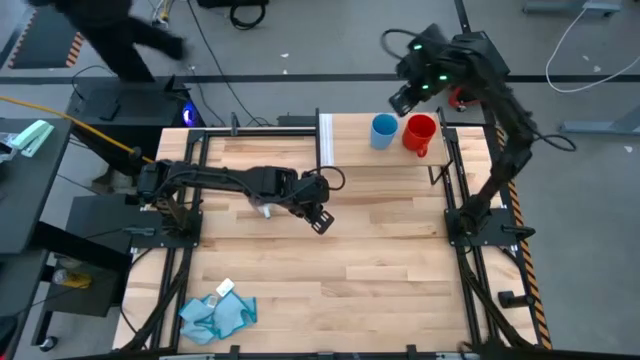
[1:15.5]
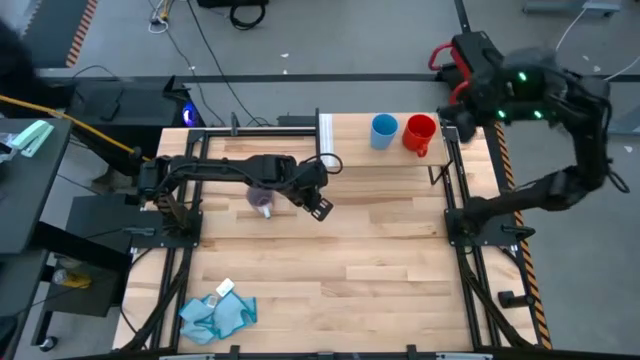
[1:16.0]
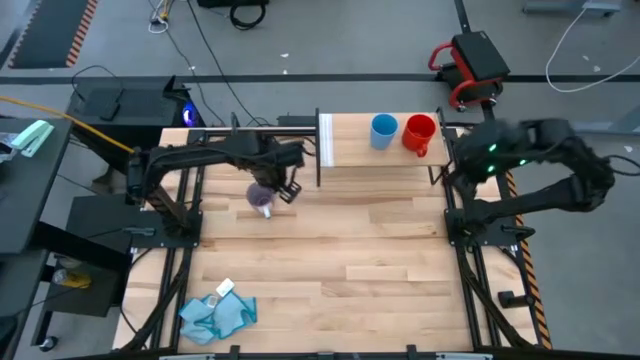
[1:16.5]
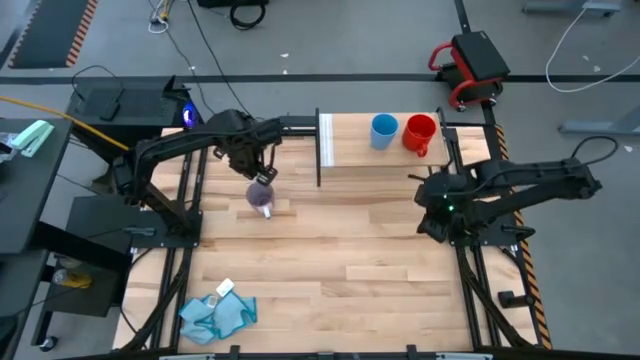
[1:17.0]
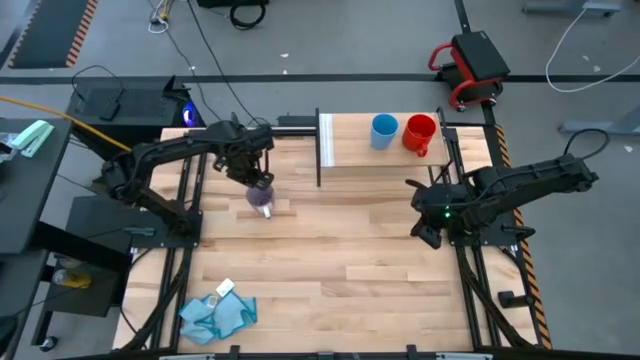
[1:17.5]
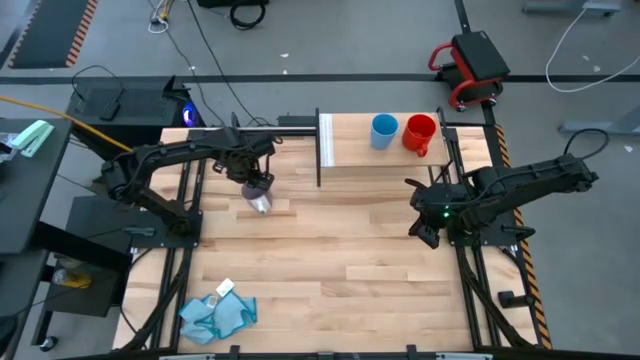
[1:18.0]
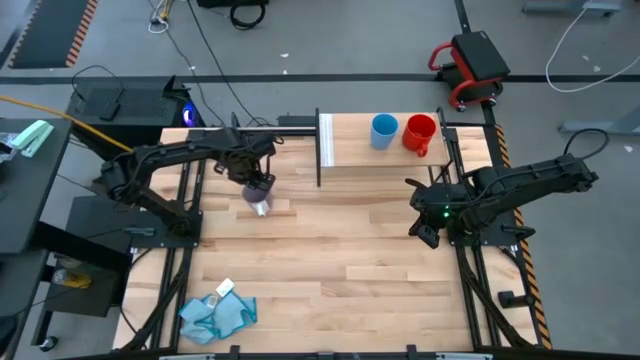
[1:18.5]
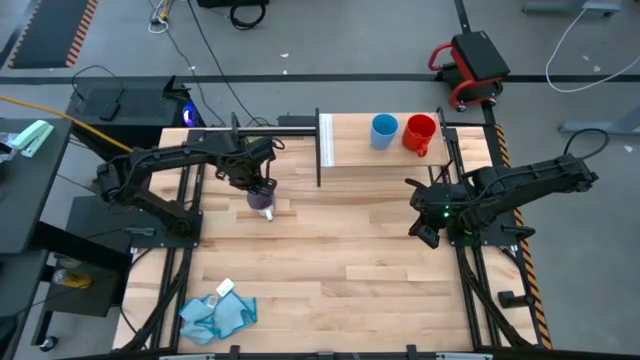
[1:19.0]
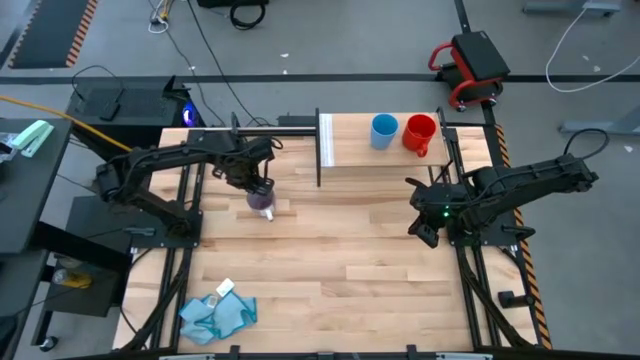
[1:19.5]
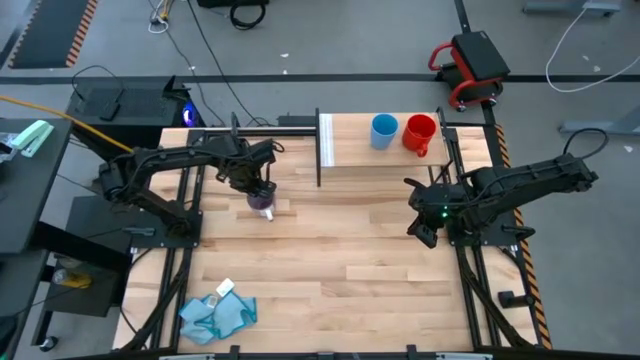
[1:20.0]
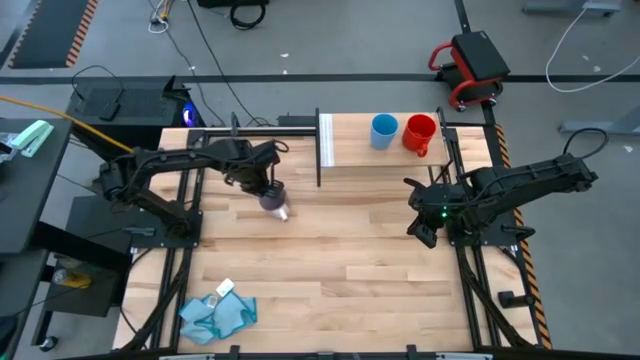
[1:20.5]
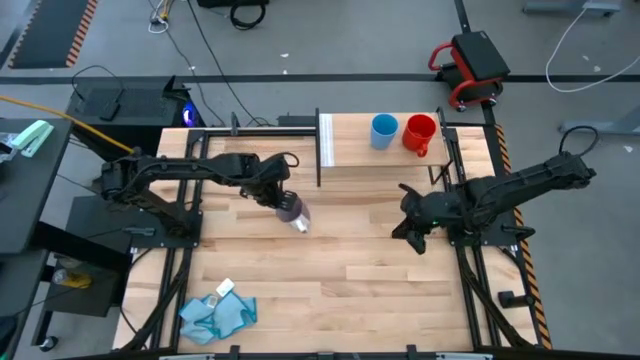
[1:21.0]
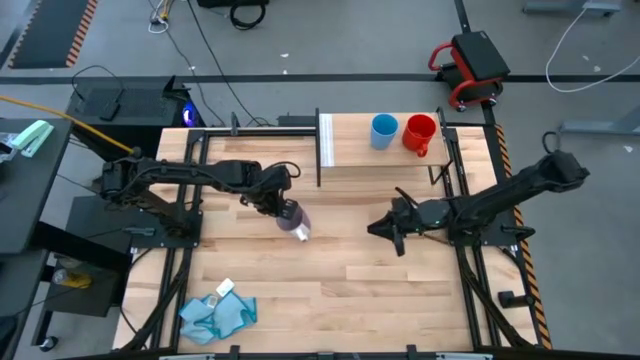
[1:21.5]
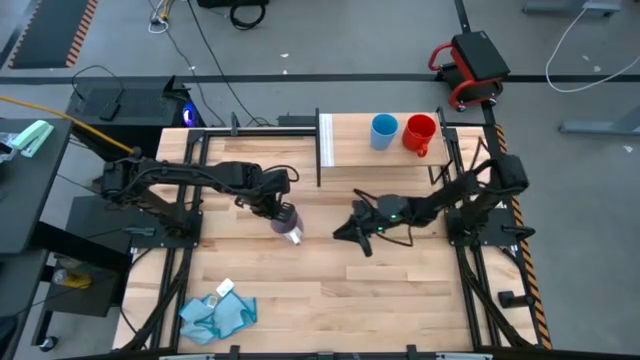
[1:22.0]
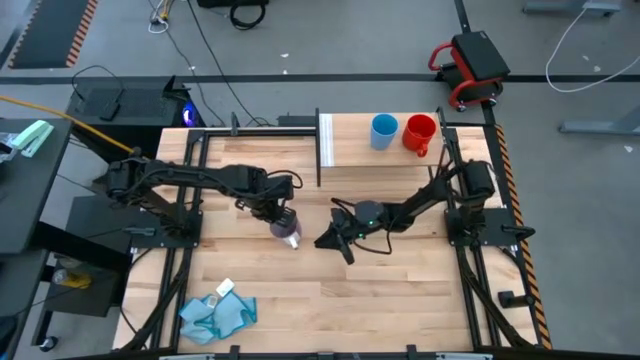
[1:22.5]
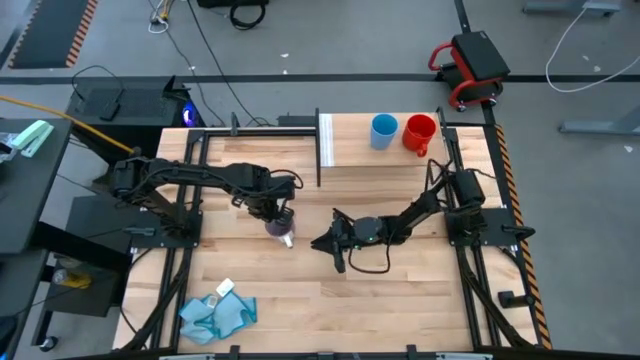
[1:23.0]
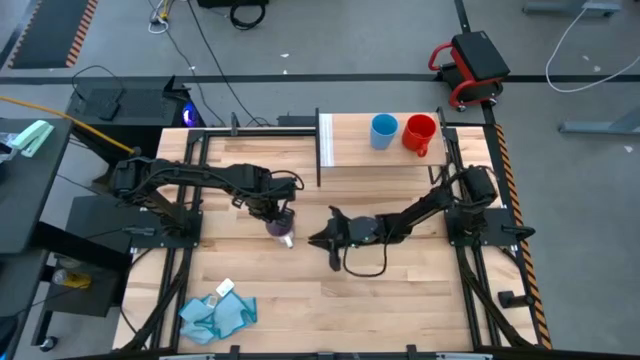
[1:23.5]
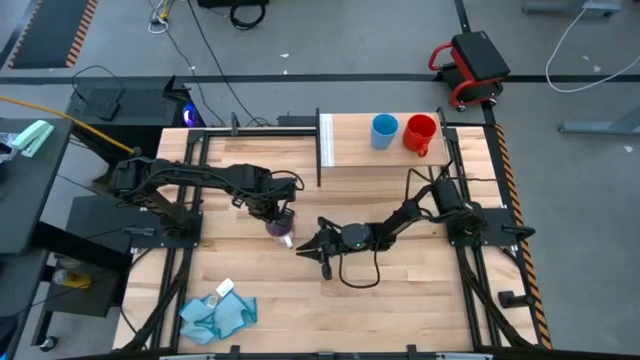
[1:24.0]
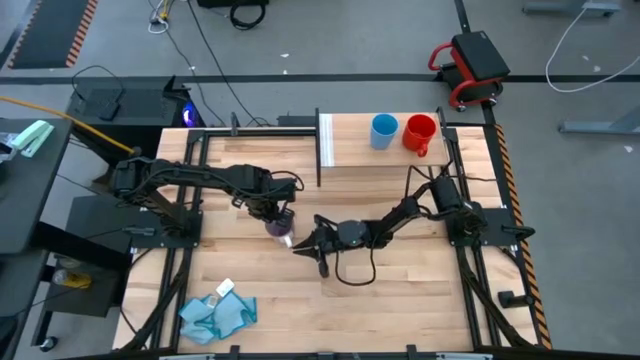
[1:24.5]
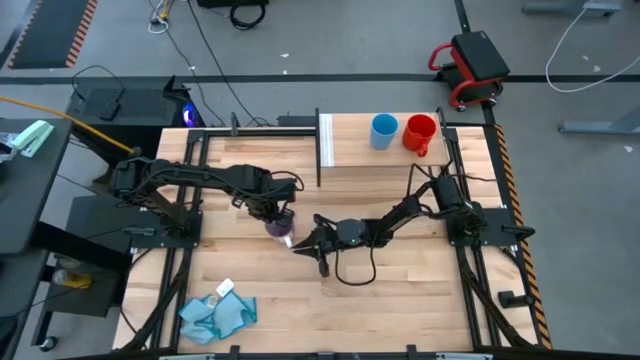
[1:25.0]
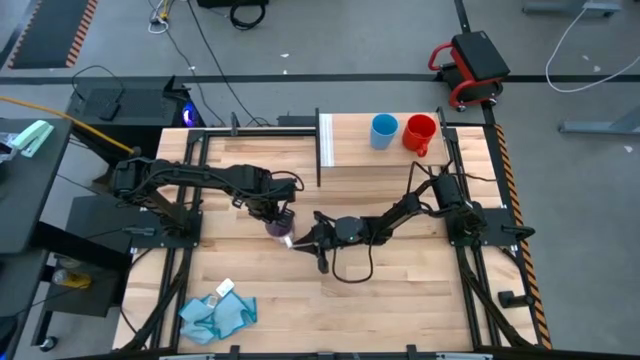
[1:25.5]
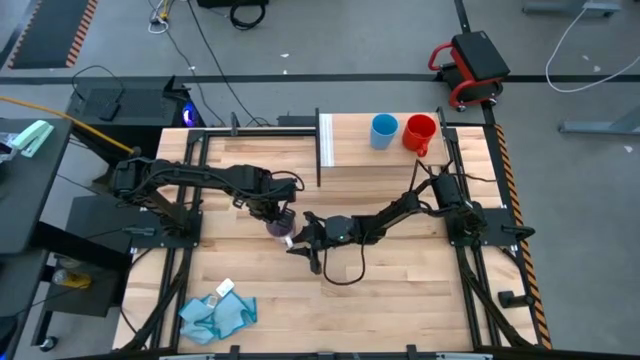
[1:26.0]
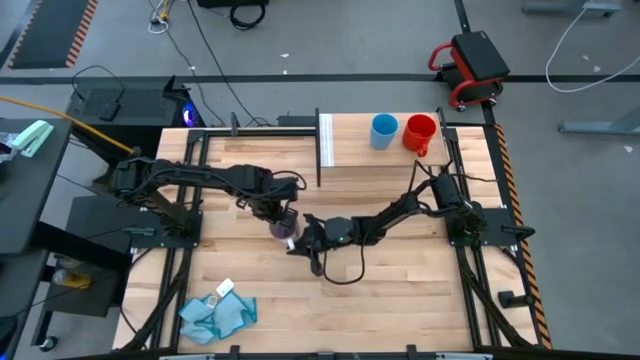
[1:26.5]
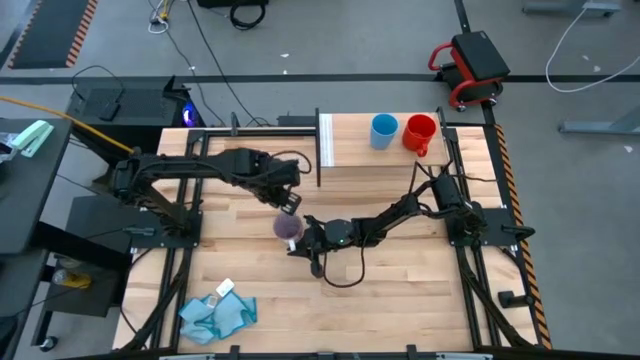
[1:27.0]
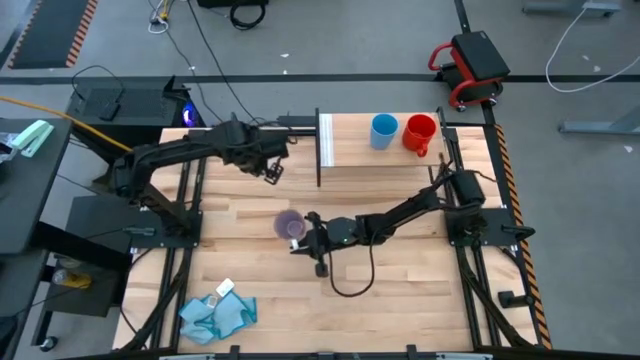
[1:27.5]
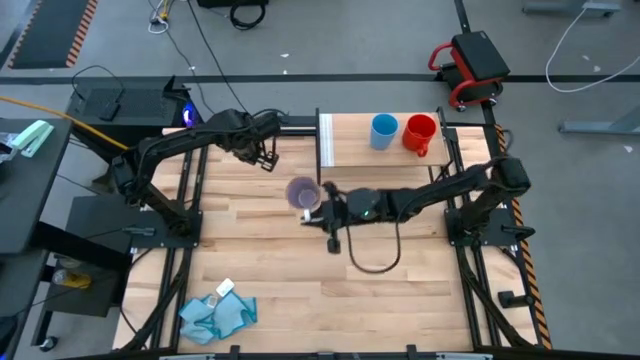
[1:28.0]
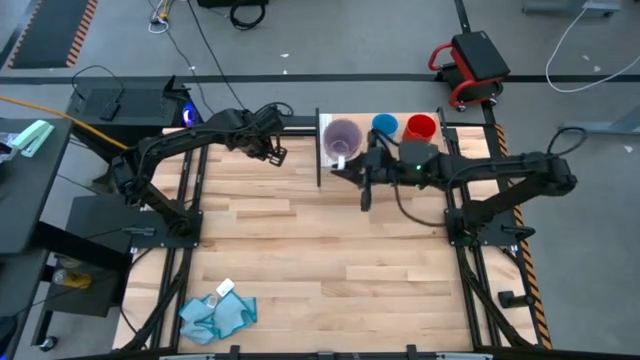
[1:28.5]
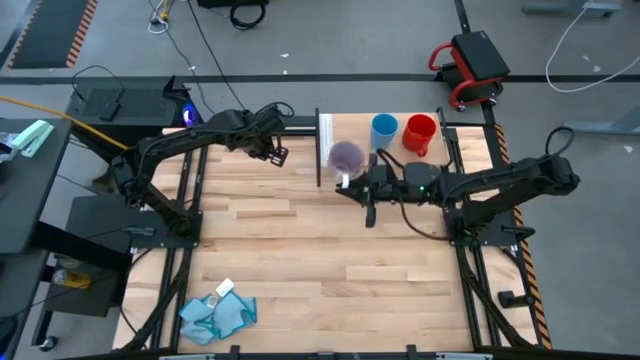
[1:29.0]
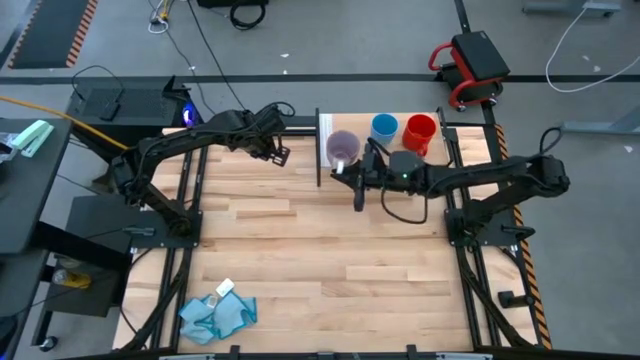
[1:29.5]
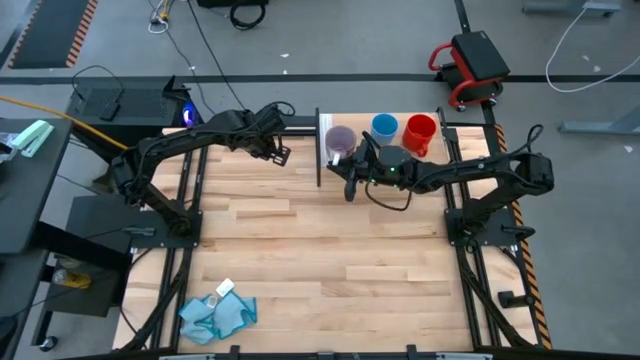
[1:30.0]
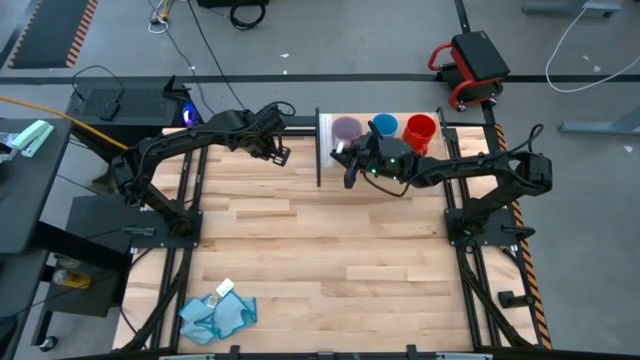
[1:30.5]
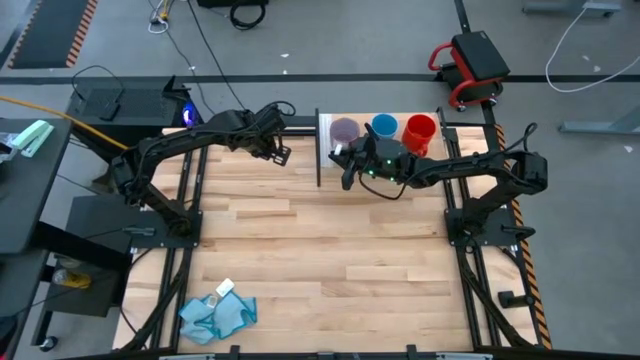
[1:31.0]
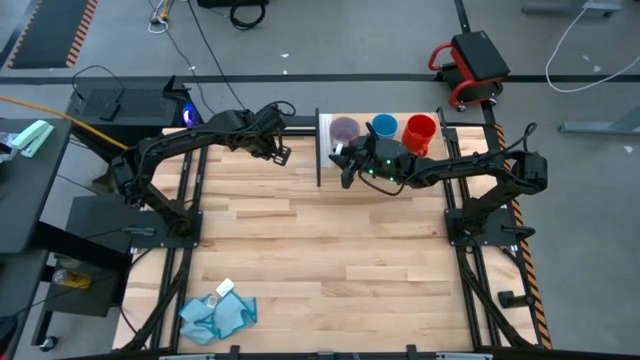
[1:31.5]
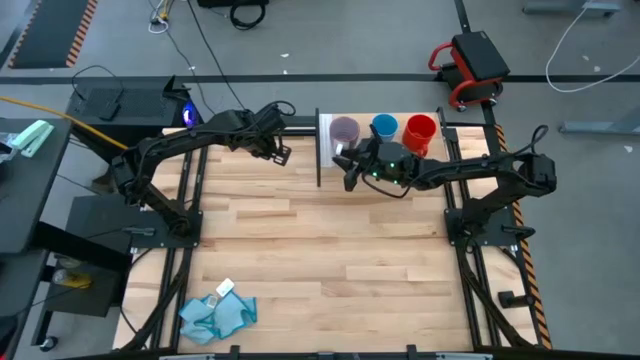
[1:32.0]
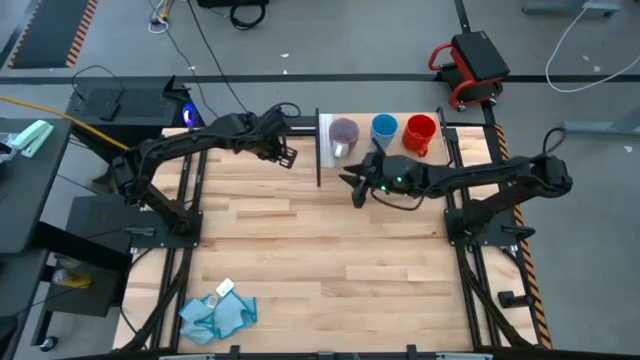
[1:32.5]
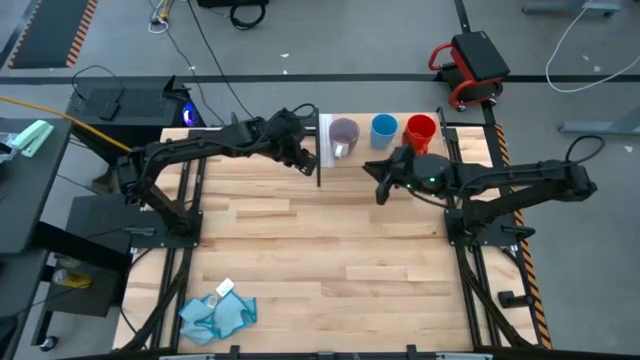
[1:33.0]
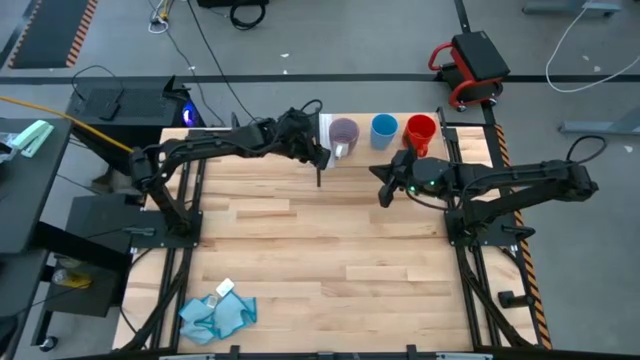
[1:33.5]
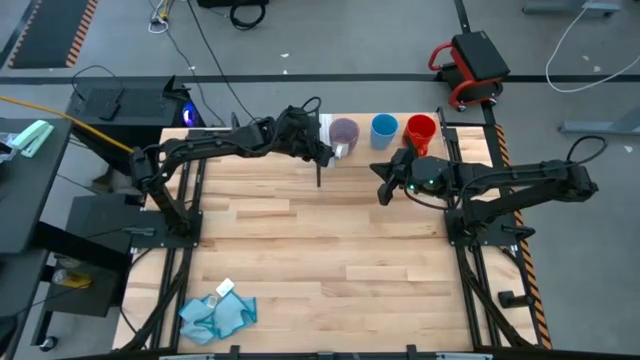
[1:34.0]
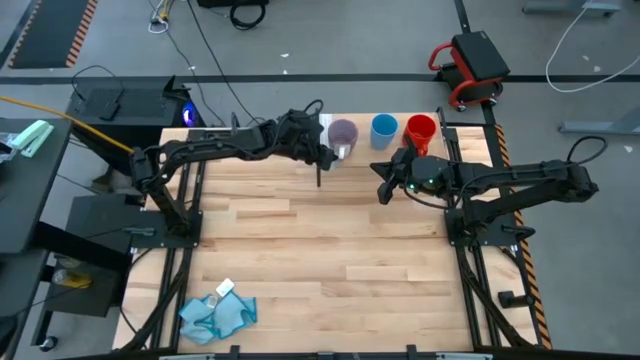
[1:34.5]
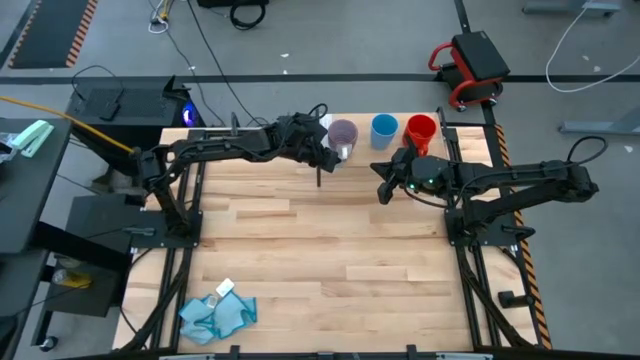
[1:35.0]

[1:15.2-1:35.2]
Task: Stack small to large cups/mugs on shelf
Put the violet mug on the shelf

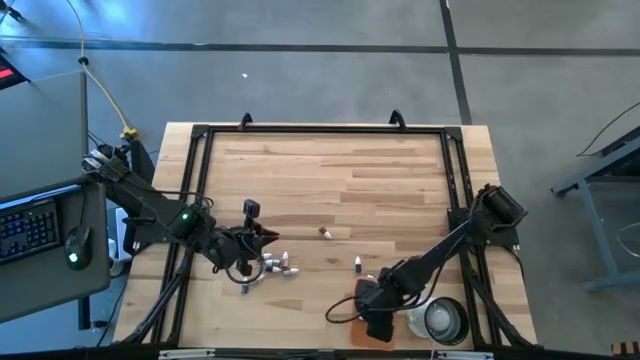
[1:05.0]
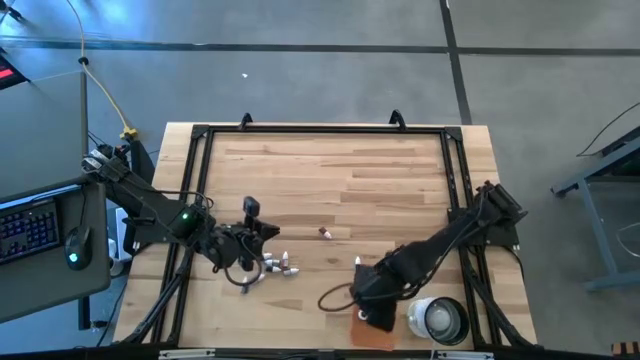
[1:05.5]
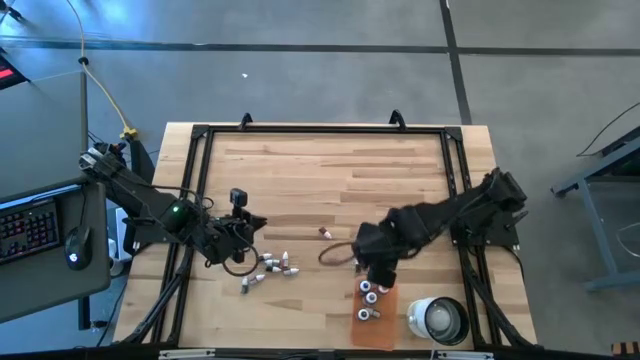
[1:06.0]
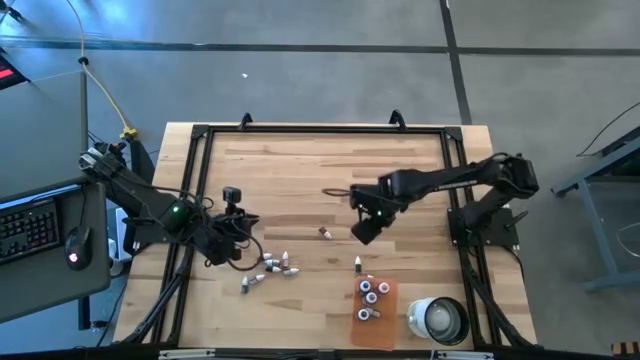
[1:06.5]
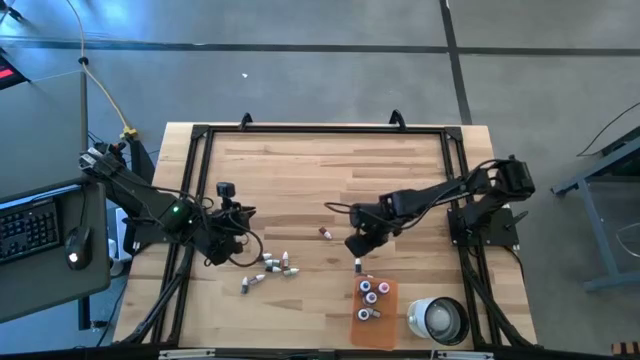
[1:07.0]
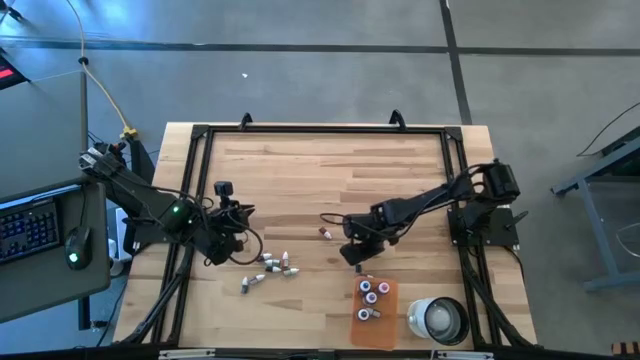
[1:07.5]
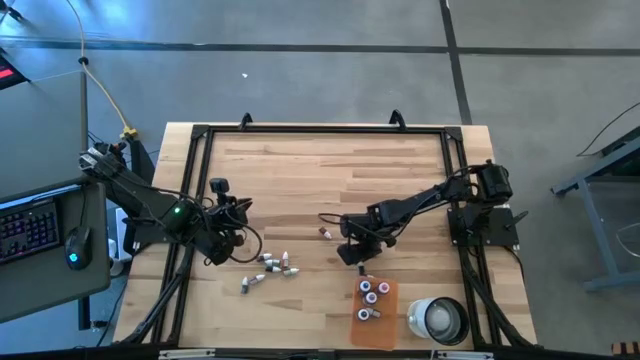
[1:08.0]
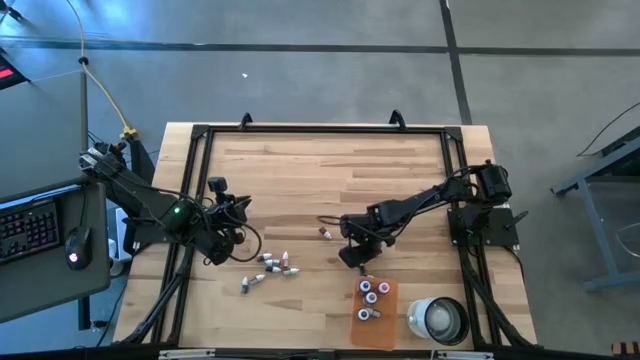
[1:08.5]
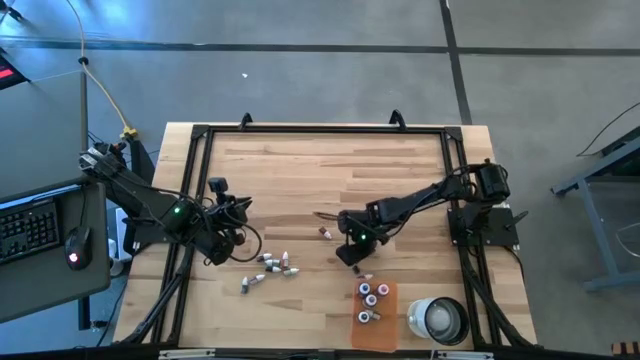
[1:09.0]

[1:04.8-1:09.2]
Task: Pick & Place food coloring
Put the top right small green food coloring bottle into the orange bin
